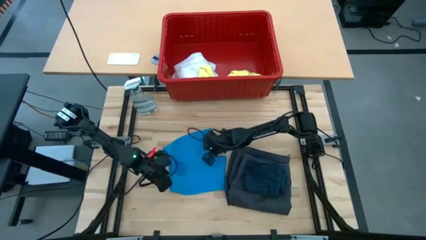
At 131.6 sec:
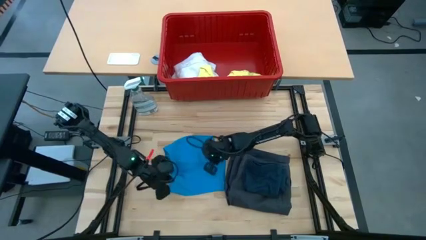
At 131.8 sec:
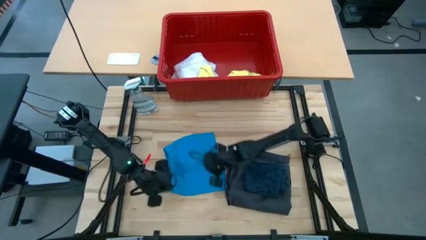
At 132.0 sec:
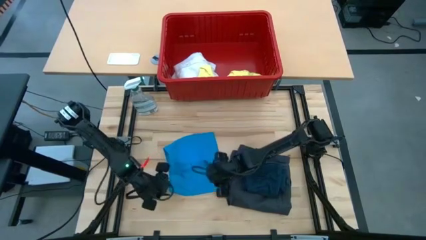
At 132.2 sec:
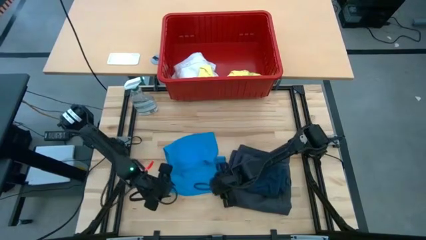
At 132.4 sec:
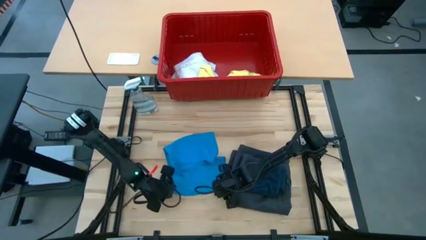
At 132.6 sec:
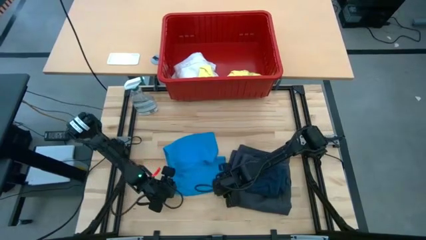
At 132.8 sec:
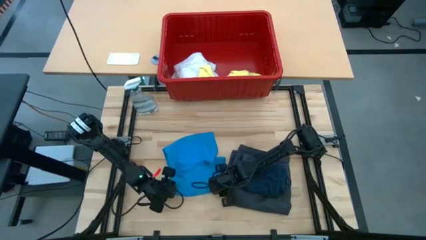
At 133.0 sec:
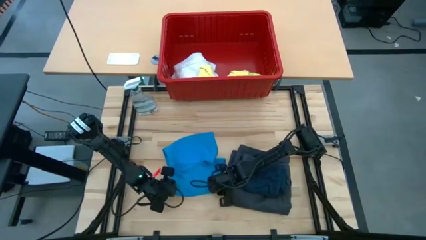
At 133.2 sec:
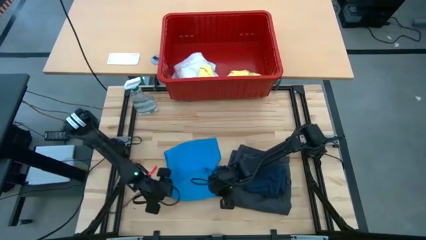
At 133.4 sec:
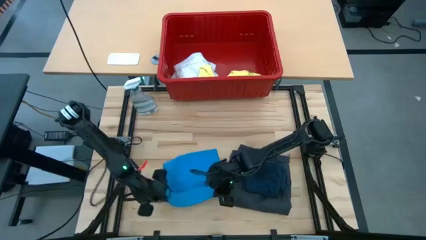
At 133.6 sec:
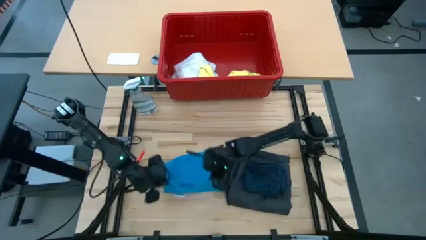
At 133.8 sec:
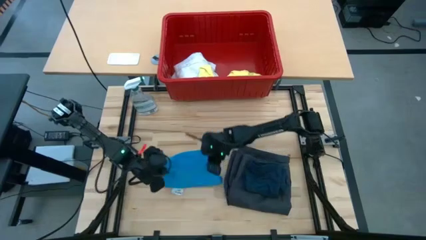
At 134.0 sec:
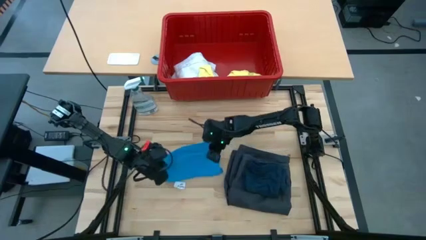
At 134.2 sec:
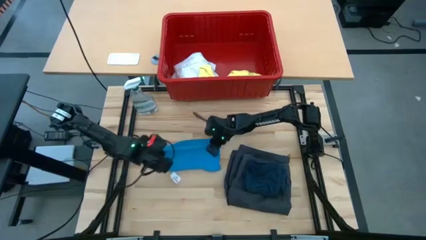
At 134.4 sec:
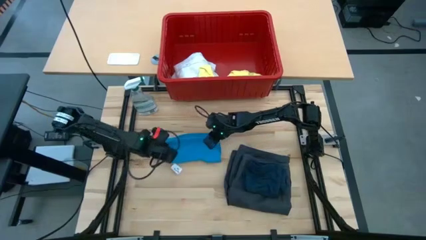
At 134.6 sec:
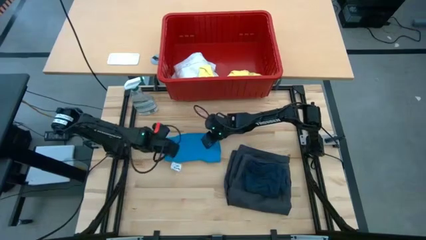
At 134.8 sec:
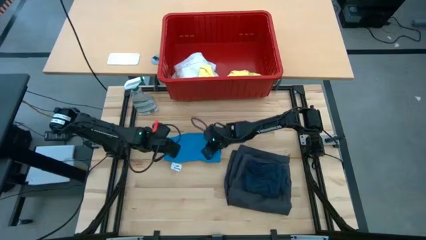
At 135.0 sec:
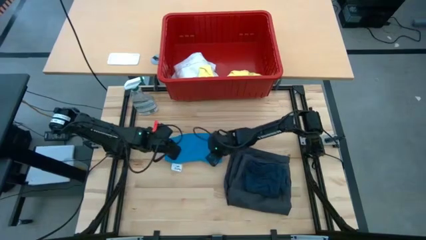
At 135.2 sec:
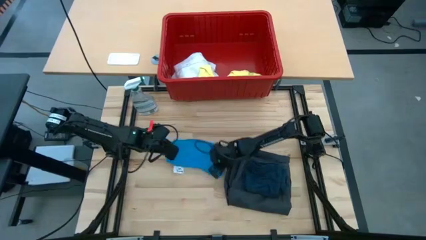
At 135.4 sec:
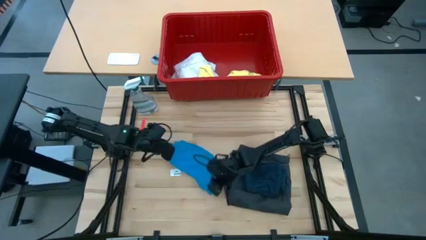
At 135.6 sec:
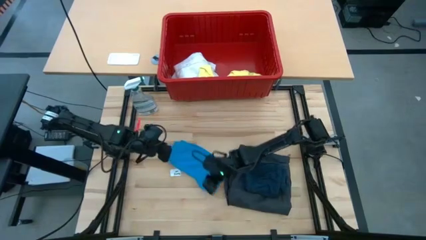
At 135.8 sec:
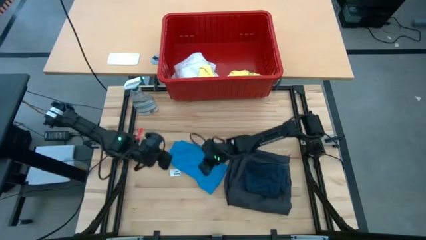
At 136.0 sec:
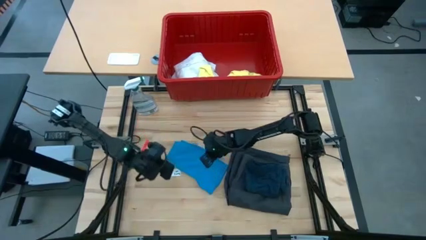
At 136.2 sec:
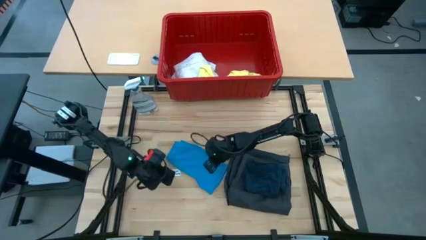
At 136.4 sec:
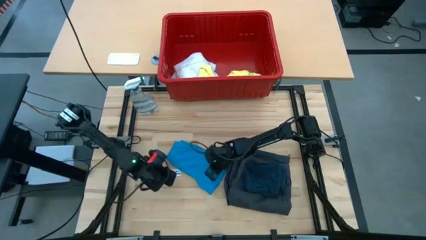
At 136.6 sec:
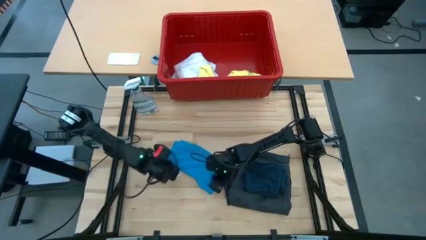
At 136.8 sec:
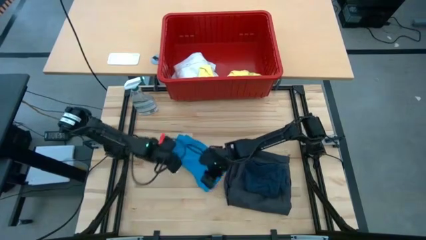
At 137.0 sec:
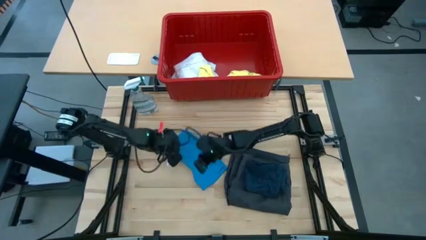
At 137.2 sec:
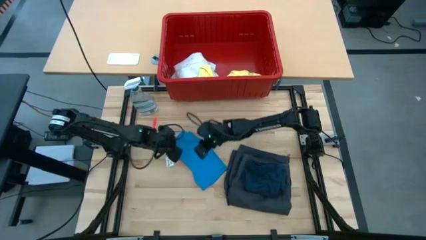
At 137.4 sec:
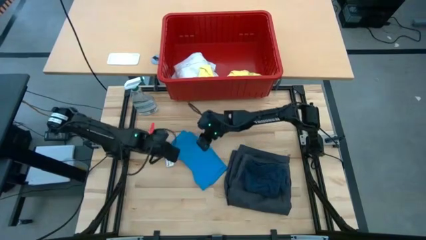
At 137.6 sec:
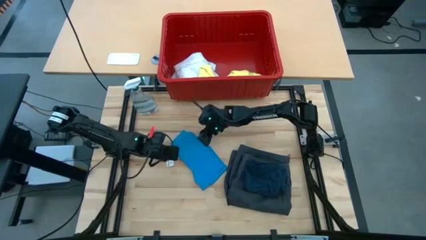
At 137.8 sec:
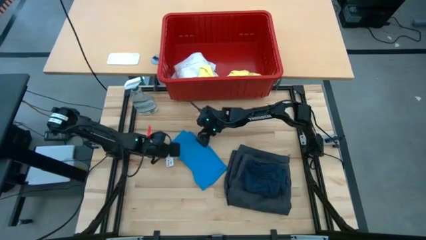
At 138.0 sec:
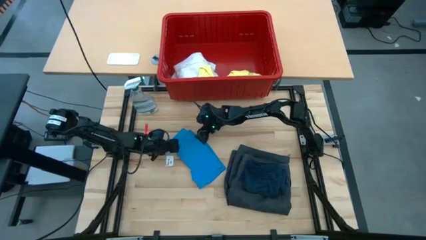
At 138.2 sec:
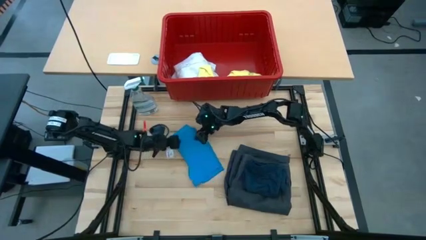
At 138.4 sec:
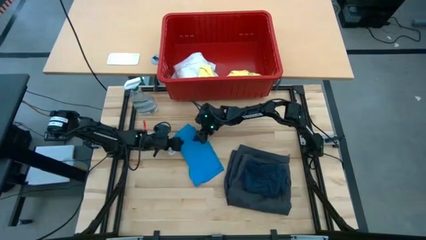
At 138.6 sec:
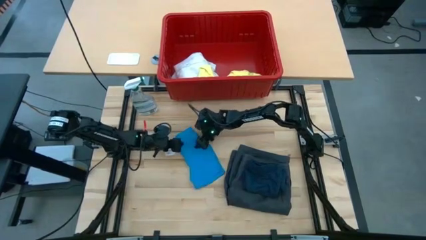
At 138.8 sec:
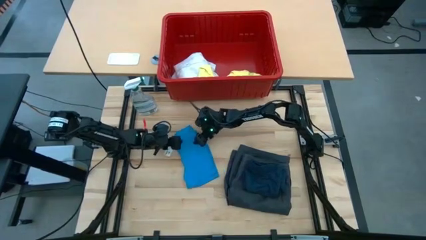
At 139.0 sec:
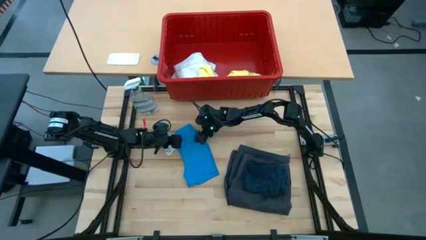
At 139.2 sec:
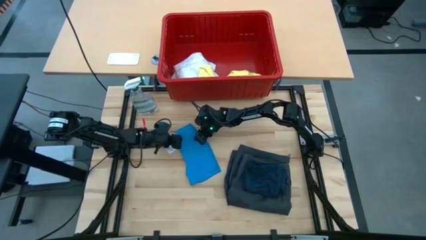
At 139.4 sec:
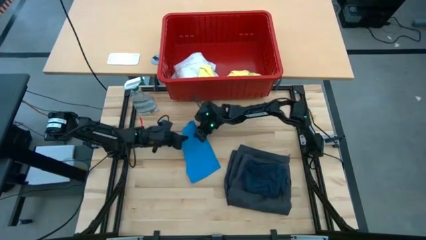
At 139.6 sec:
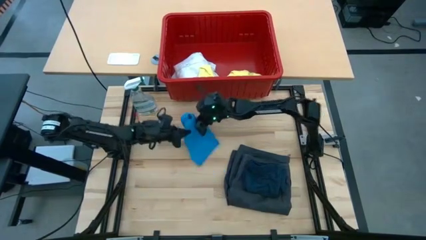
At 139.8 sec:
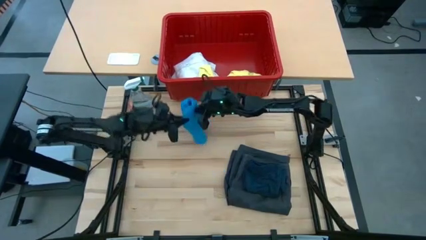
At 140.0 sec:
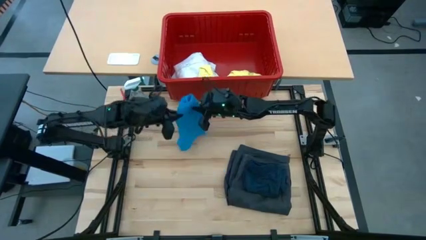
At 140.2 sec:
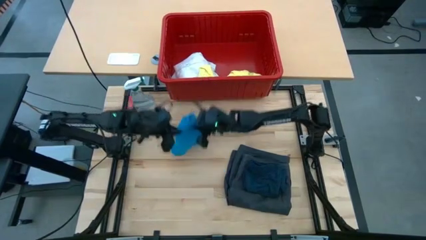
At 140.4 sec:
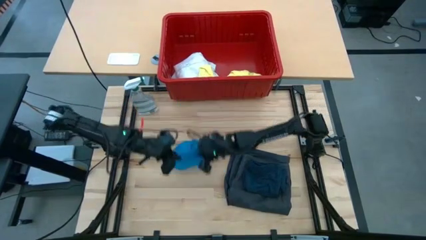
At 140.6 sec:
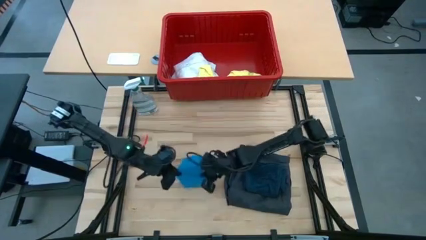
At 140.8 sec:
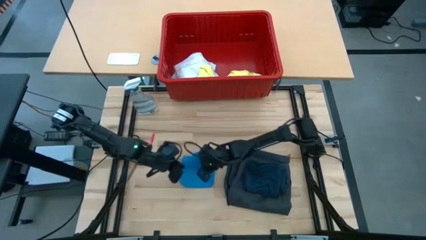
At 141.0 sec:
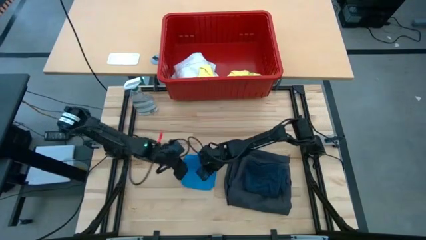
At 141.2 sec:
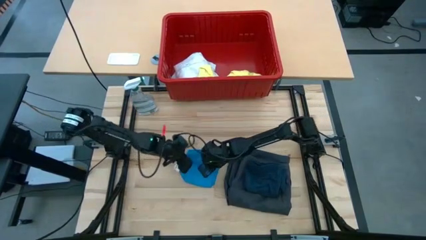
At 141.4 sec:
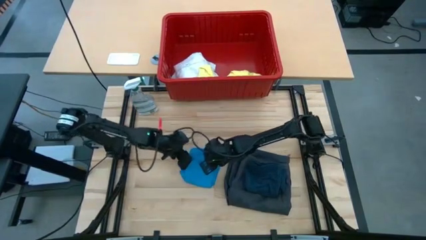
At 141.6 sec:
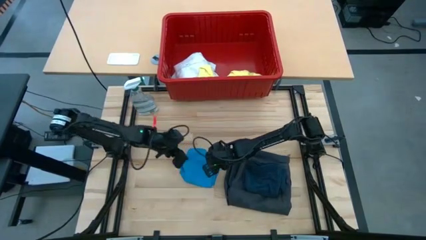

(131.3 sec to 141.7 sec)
Task: Fold laundry
Fold the blue shorts

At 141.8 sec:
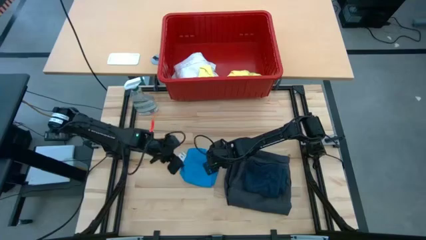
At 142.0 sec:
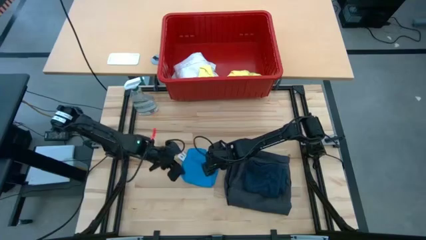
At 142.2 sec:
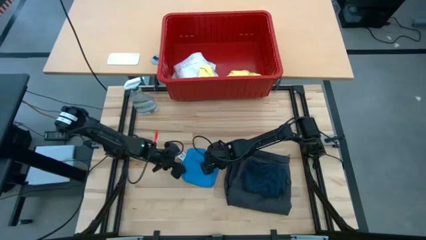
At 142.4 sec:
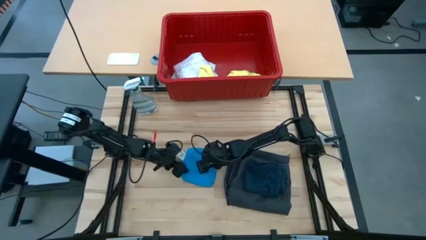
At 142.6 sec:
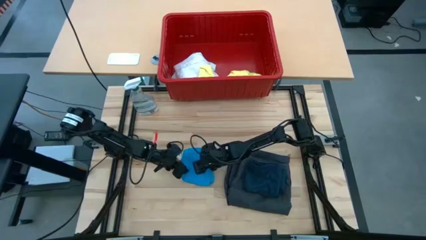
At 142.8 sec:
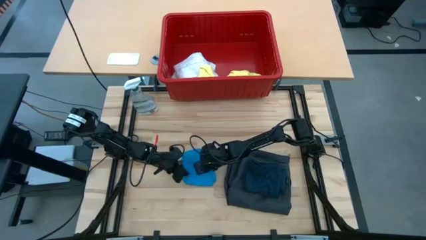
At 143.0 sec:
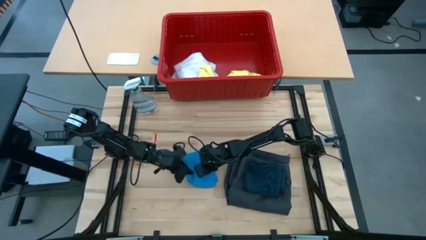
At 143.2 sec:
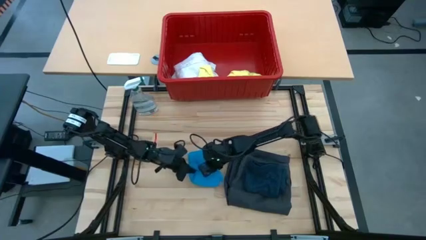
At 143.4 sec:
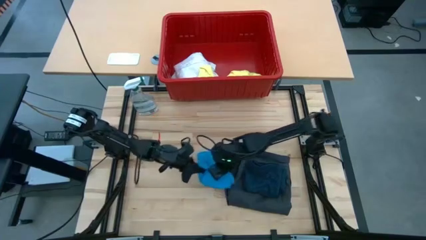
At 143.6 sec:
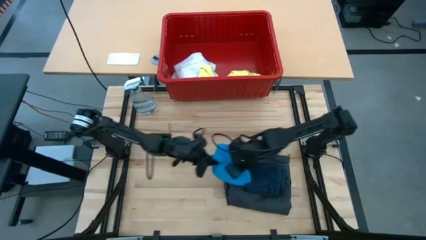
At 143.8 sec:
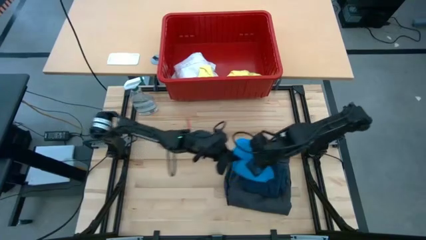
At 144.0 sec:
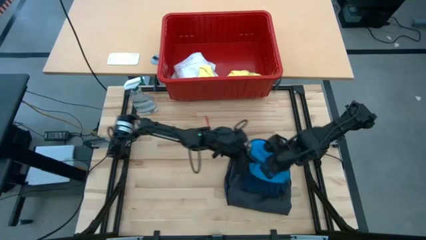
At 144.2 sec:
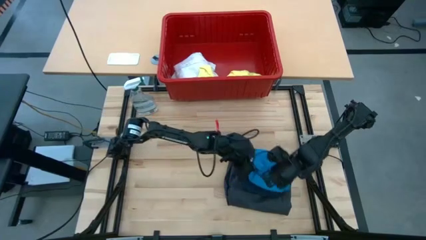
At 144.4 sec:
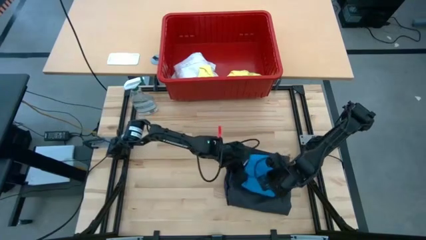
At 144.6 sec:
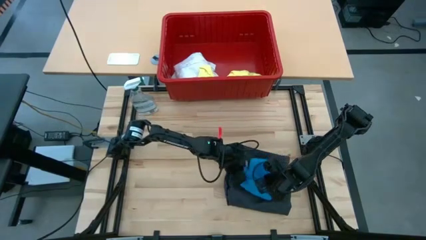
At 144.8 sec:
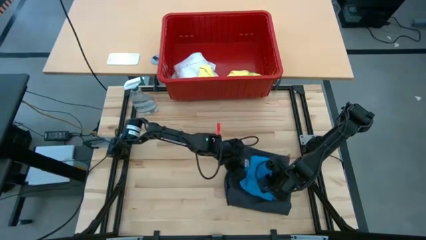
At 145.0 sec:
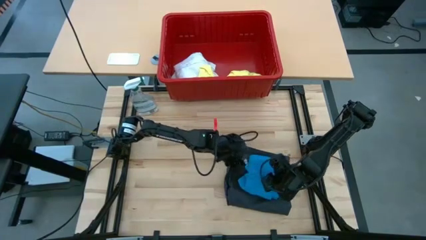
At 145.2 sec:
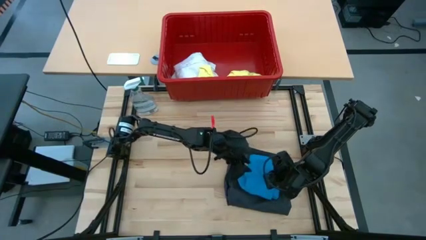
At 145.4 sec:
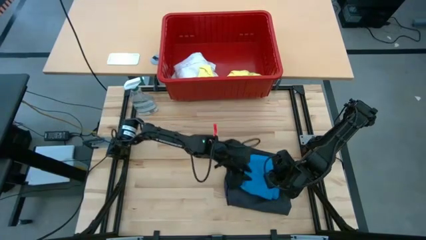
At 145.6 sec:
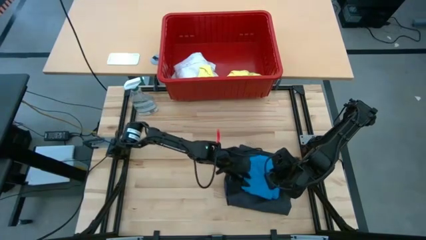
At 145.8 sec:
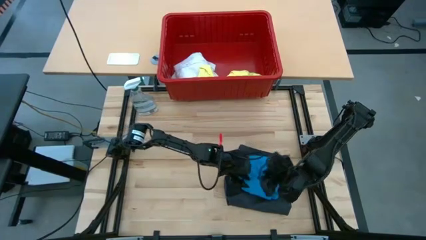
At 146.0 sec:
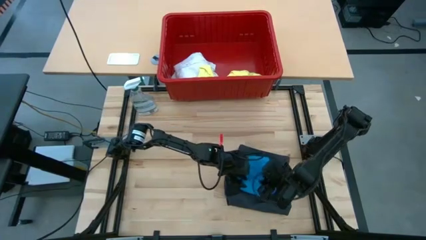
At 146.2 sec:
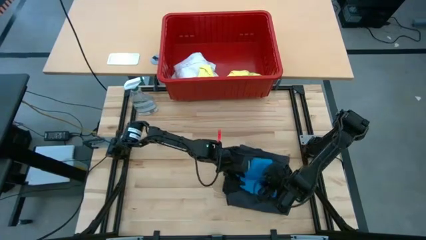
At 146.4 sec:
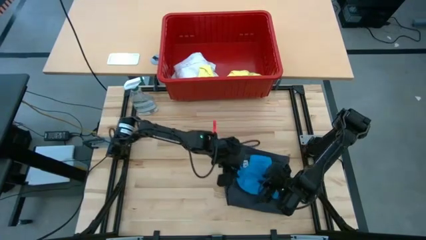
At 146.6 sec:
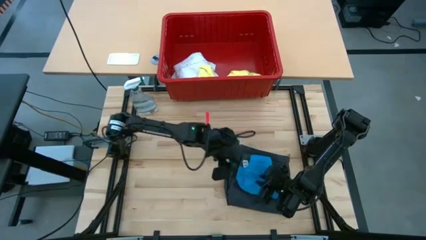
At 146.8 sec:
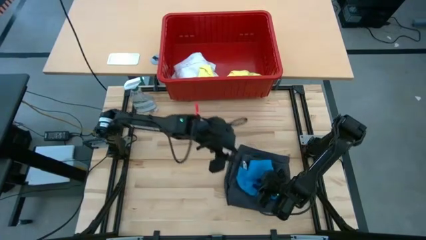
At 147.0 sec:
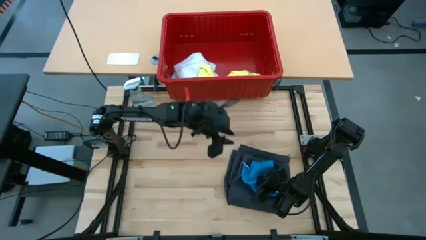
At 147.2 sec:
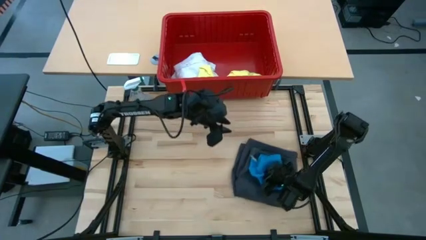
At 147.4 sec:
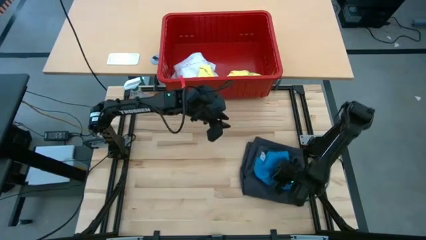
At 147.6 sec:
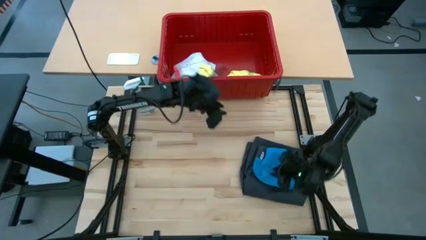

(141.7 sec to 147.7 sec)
Stack the blue shorts on top of the dark blue shorts
